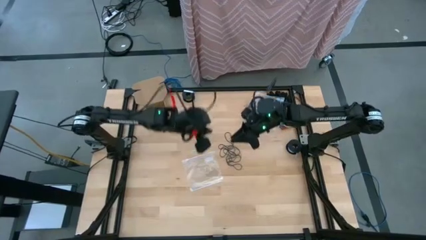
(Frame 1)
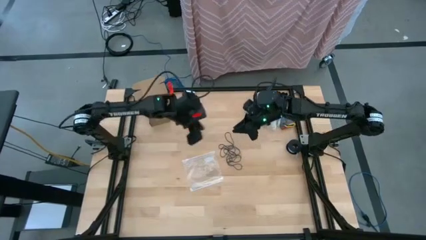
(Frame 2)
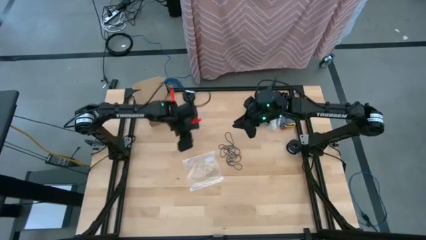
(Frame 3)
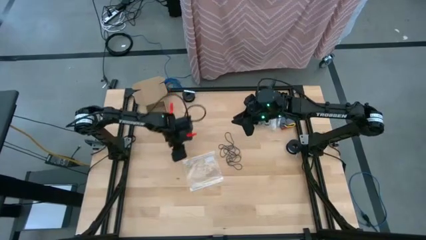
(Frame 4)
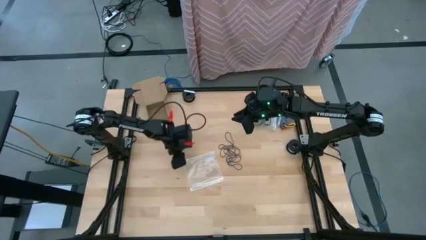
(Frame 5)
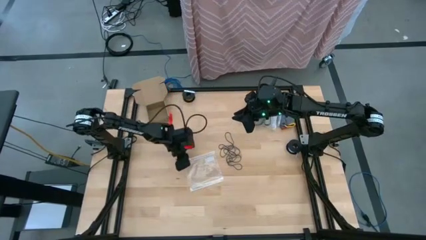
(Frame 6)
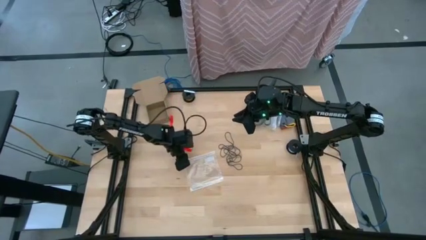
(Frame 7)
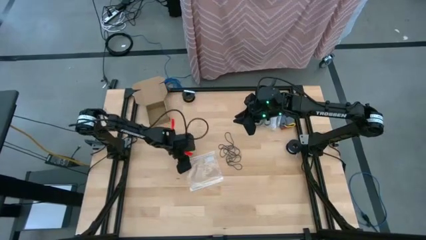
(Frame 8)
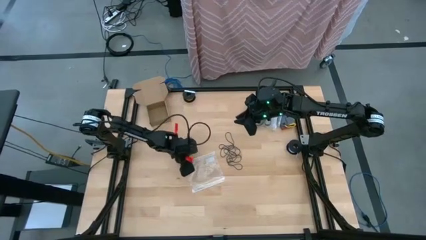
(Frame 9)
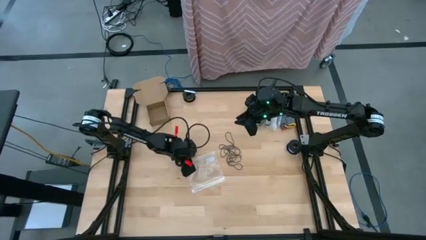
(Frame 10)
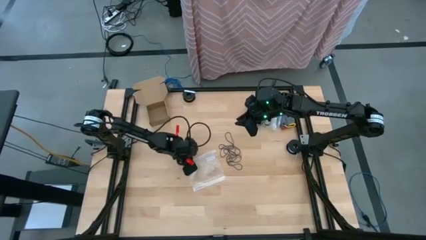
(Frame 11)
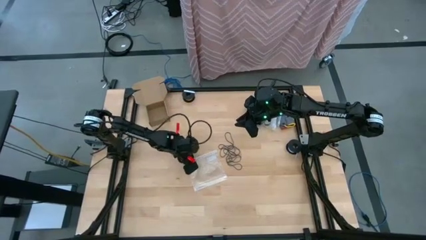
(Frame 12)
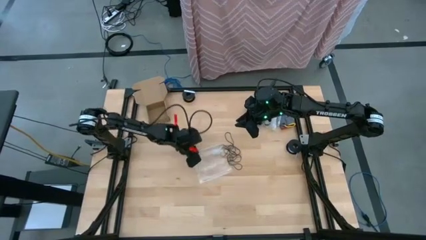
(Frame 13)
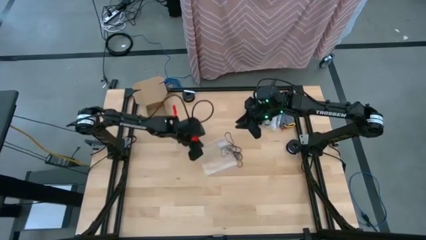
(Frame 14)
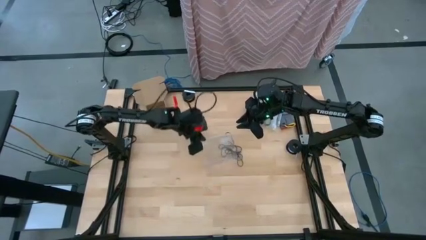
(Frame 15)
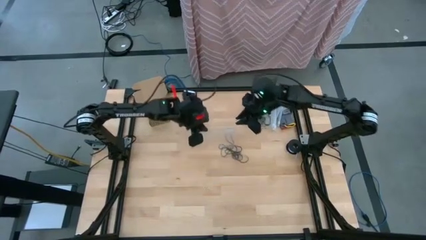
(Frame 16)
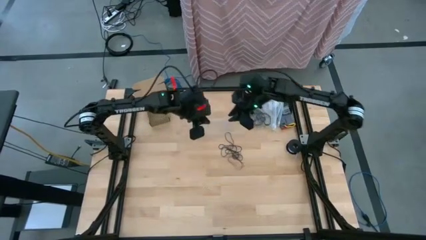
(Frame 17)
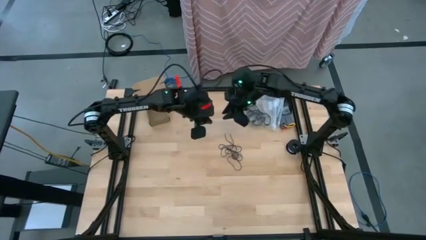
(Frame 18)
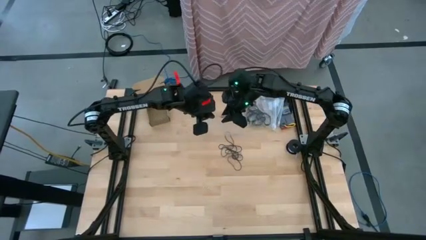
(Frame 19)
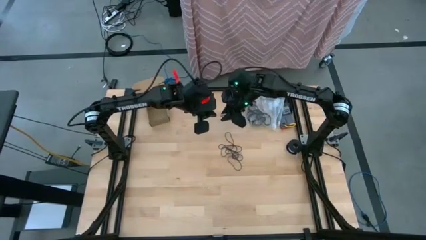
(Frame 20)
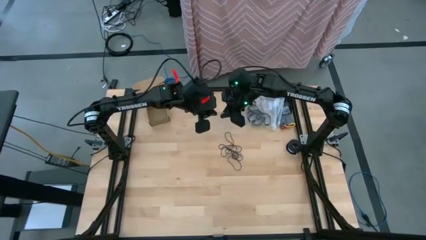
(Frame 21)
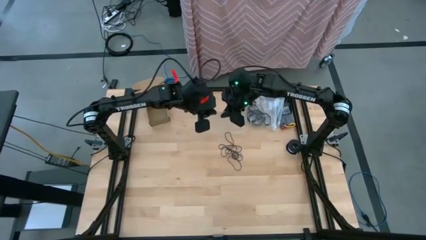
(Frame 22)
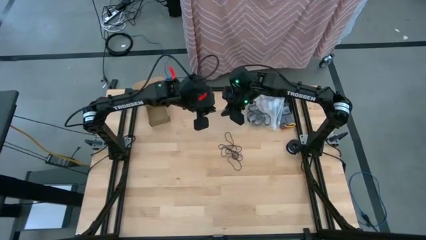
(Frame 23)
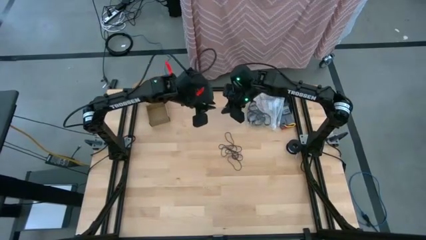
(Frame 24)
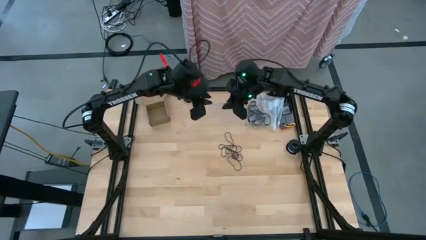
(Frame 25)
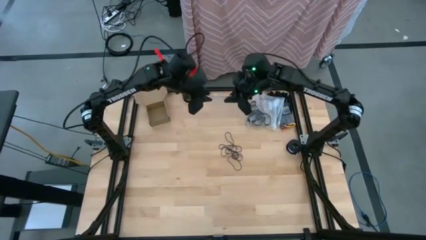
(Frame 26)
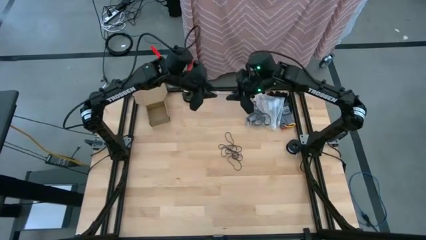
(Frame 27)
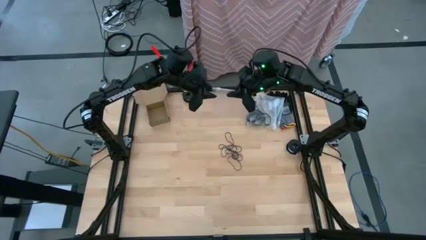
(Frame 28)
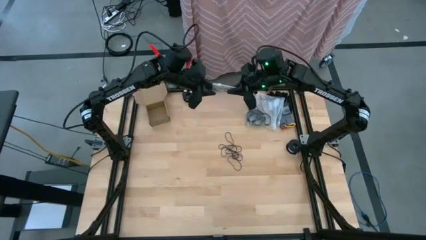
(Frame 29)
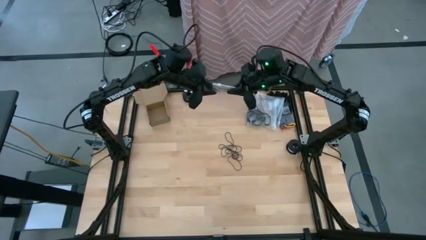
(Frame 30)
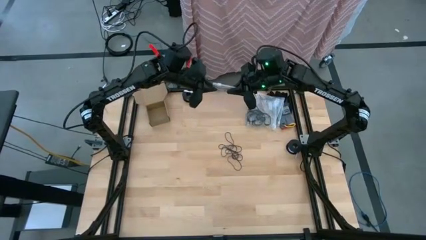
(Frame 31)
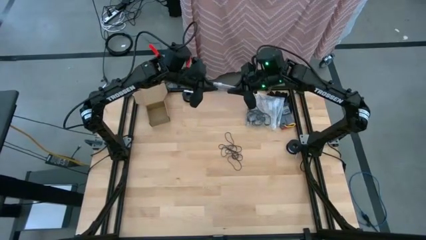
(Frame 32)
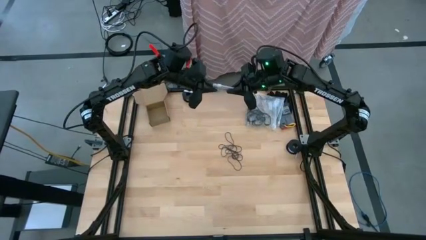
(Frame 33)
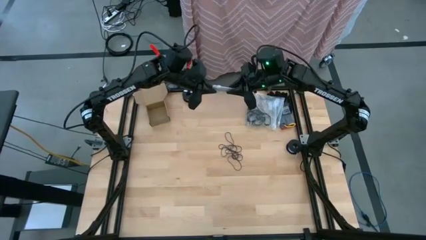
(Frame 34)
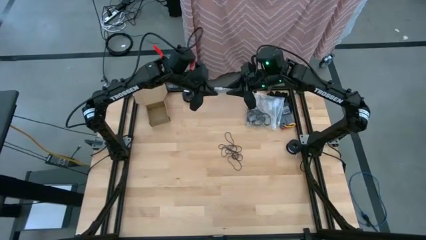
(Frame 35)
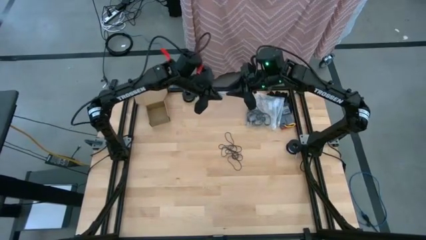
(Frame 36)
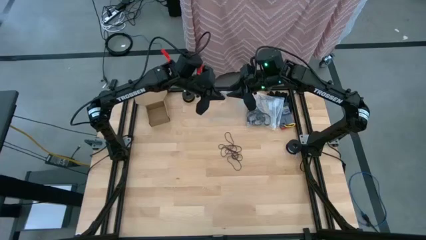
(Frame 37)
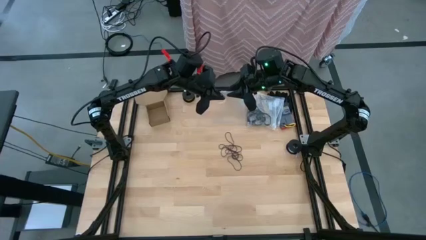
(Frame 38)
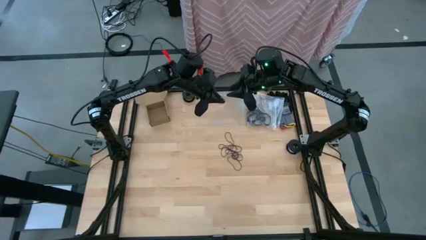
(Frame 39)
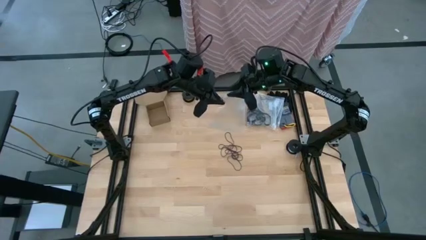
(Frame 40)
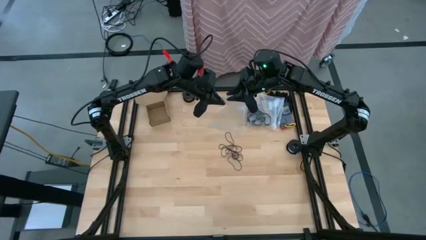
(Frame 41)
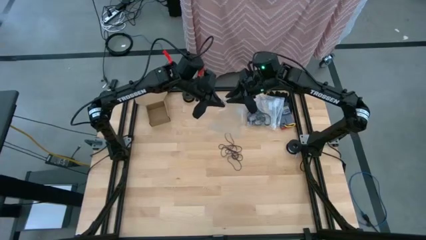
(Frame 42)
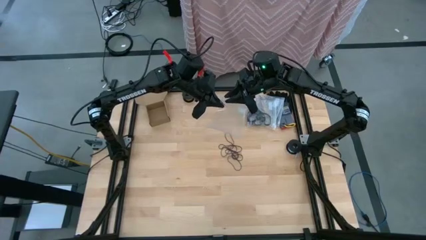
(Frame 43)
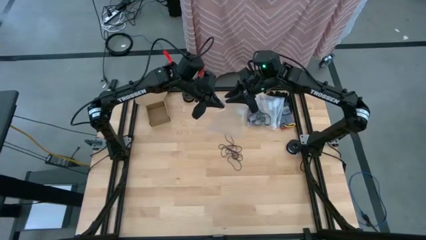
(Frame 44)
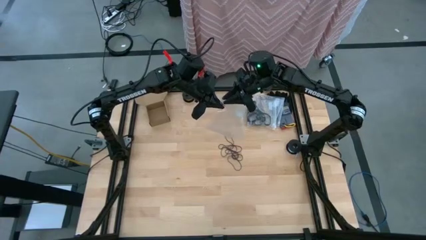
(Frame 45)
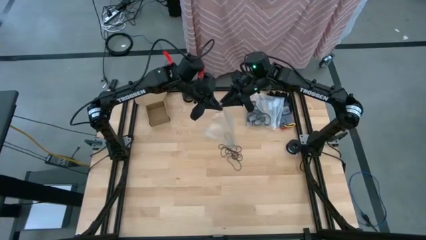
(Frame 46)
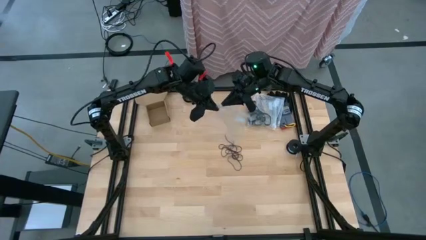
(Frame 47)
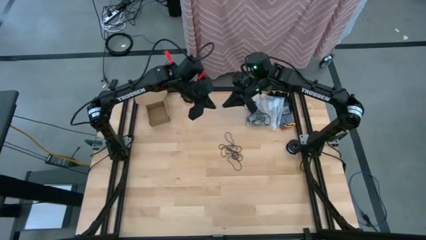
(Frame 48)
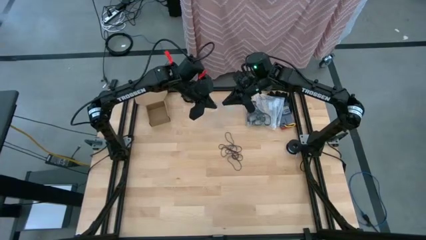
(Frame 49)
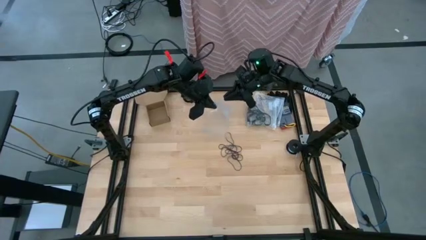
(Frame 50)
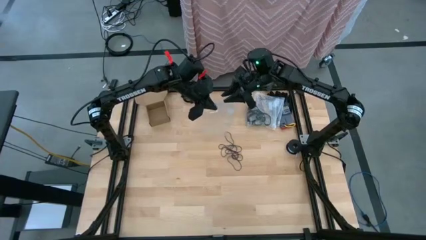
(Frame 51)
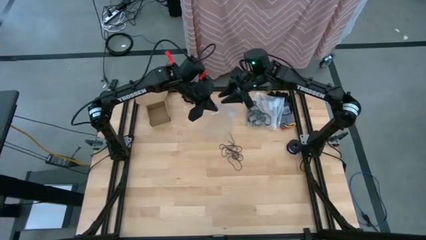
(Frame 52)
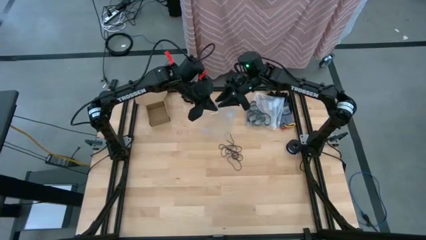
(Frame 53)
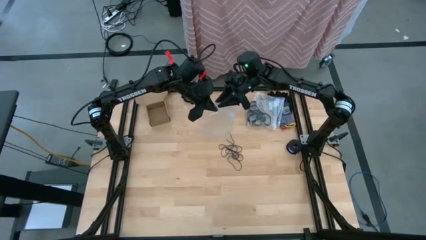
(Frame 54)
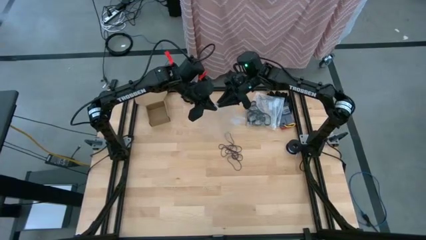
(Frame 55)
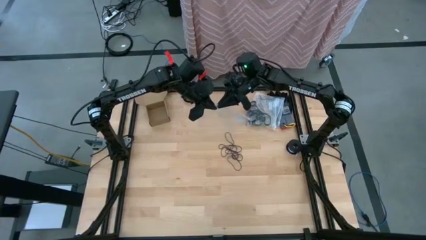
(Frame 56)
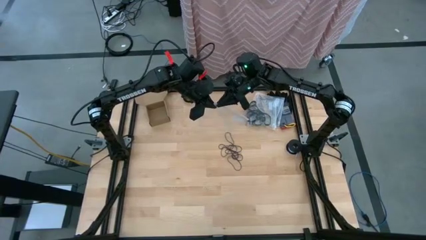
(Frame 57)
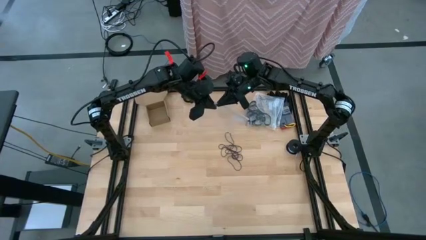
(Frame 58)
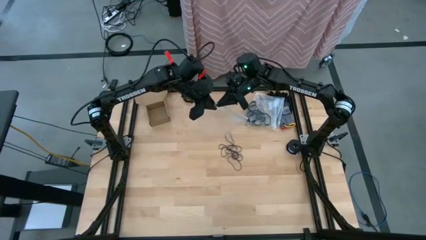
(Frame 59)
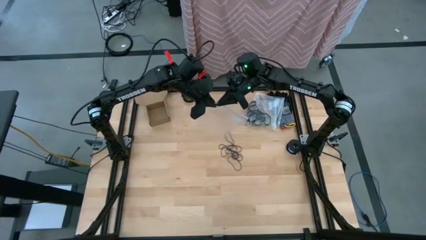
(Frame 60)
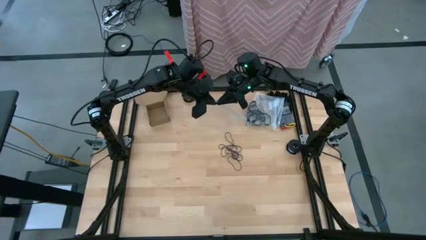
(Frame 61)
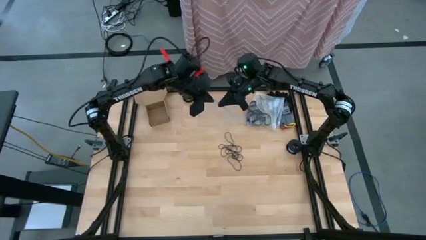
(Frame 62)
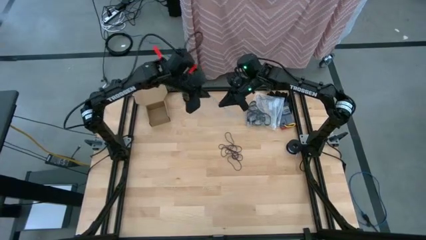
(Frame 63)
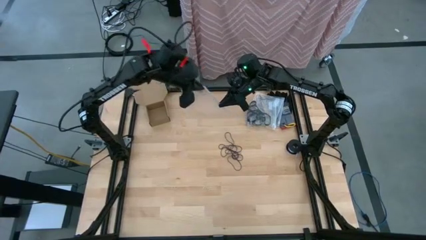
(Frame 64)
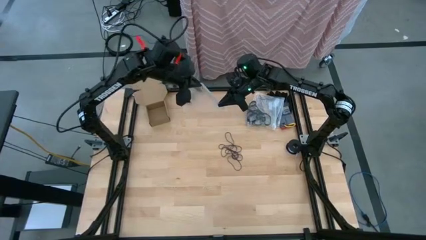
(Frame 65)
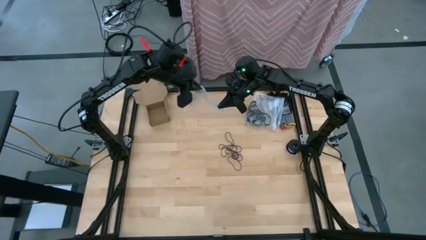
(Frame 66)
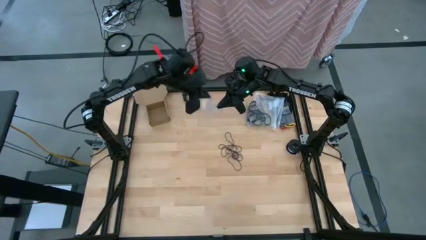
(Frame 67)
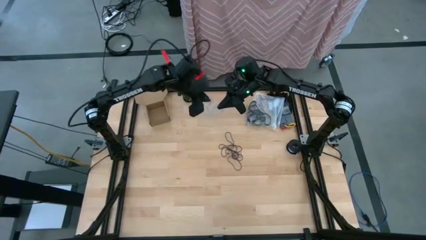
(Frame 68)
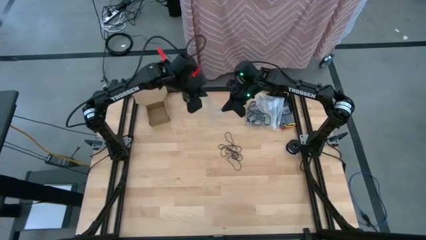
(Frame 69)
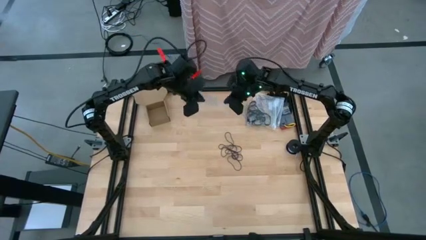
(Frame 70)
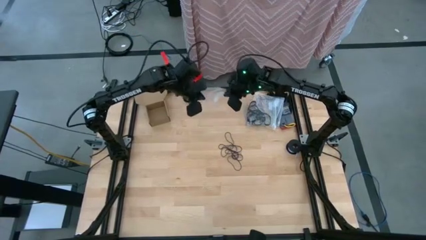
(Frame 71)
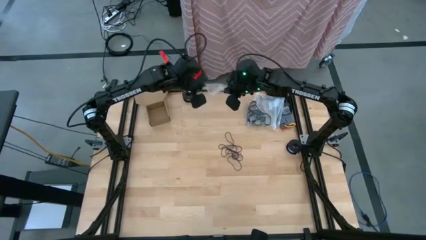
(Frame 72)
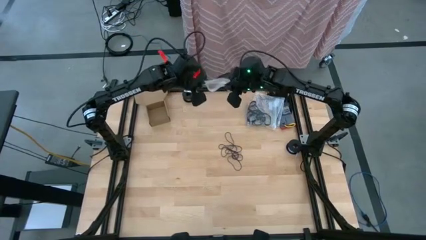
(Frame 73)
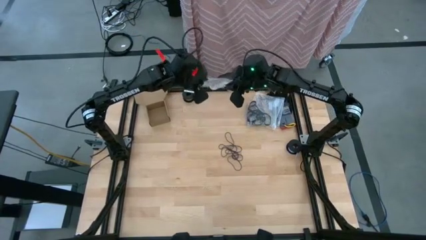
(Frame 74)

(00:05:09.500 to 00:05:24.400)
Task: Sort rubber bands
Open the transparent zip bag
